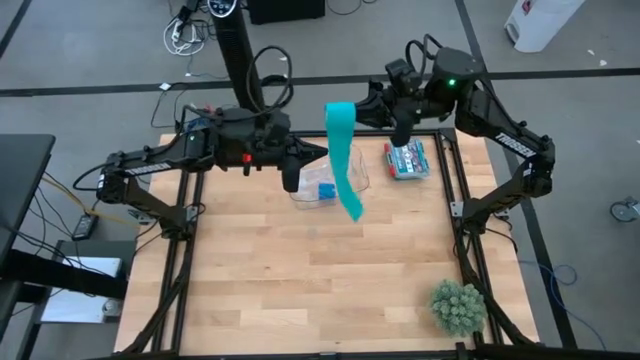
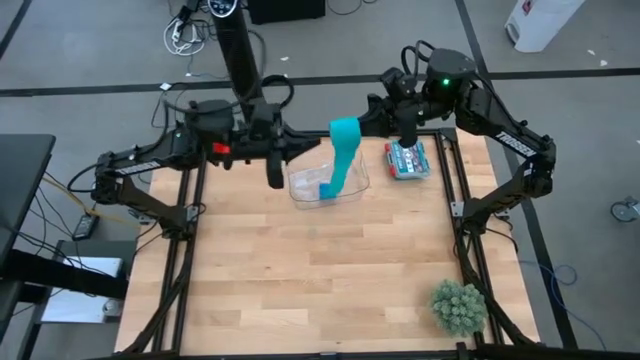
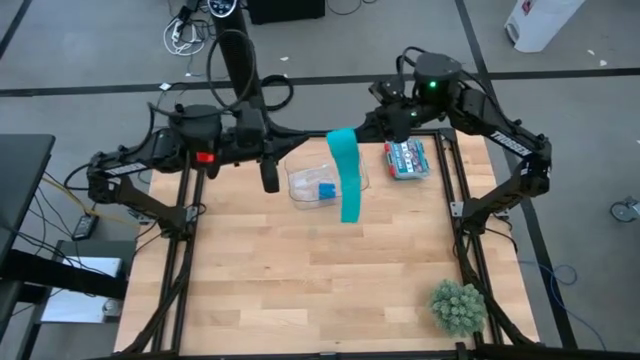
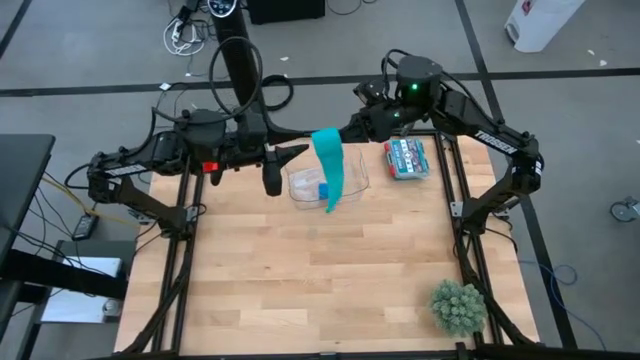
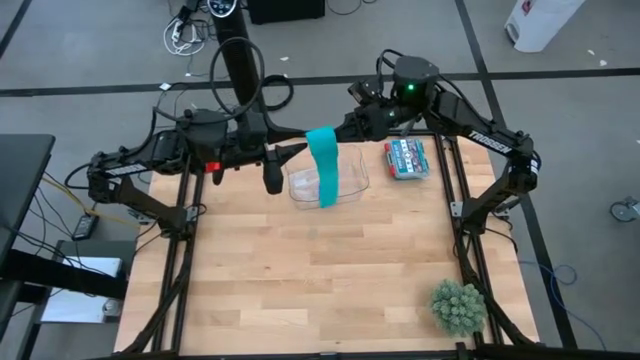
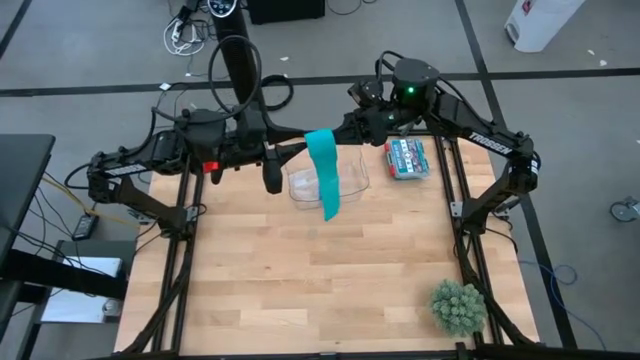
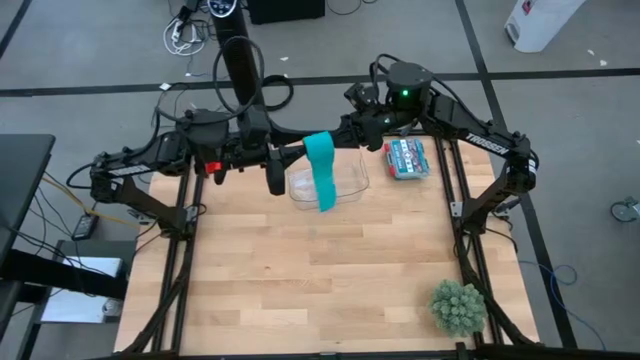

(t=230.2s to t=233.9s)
Task: Roll bandage
Roll the sky blue bandage

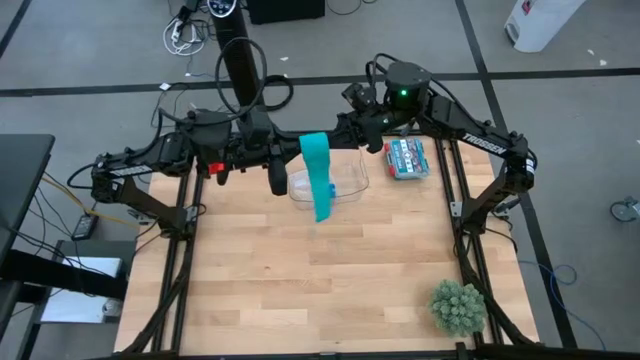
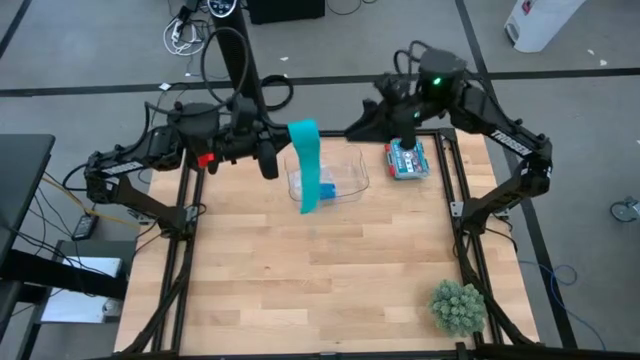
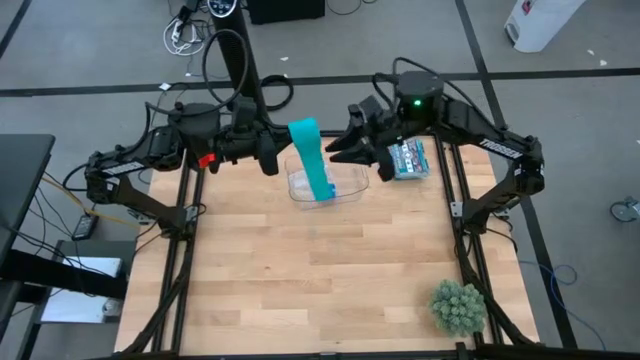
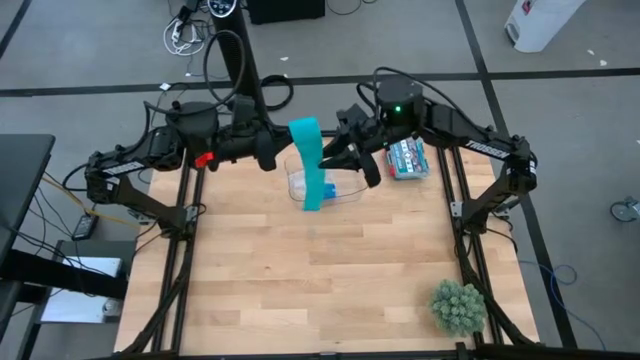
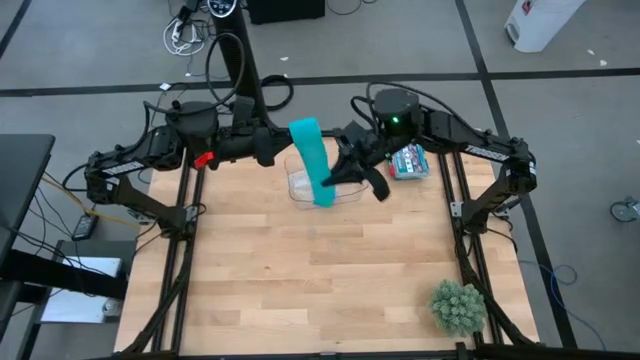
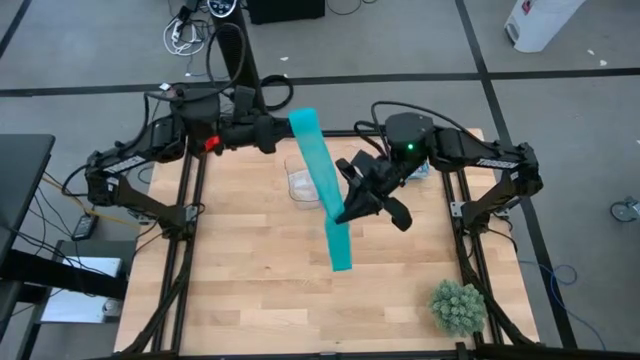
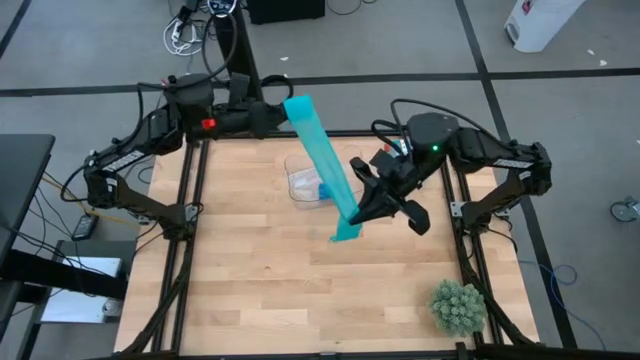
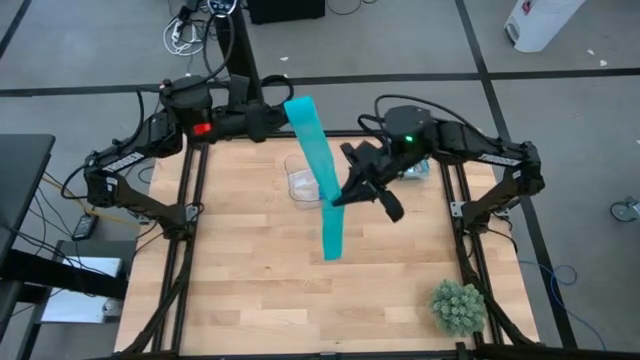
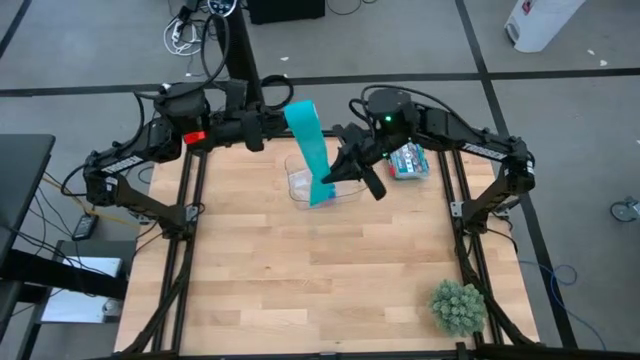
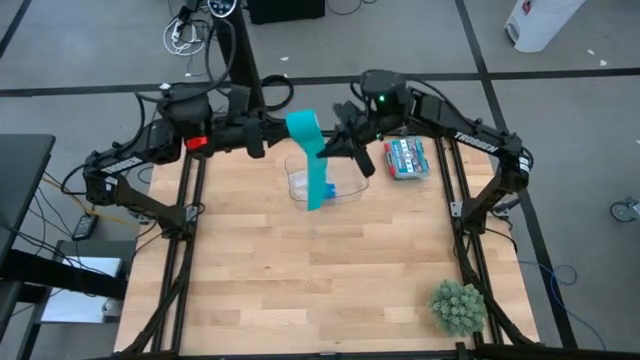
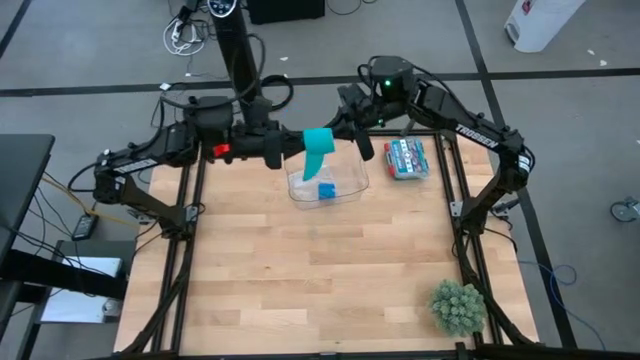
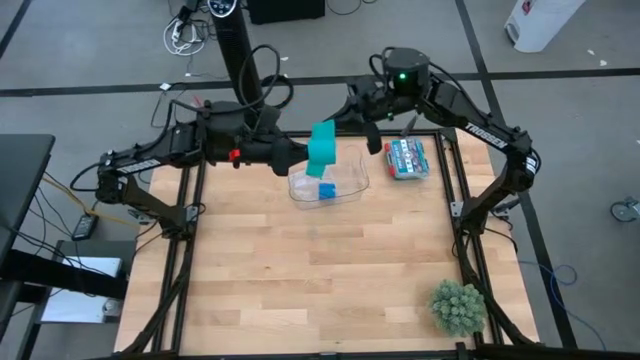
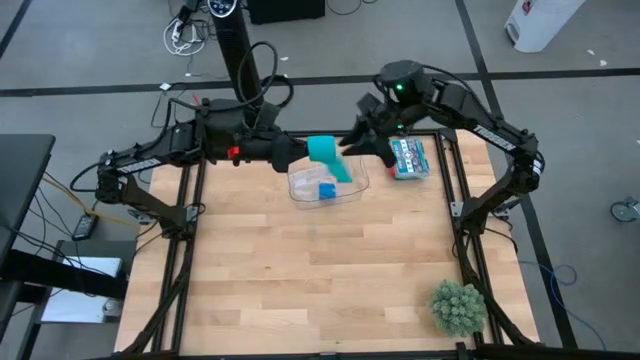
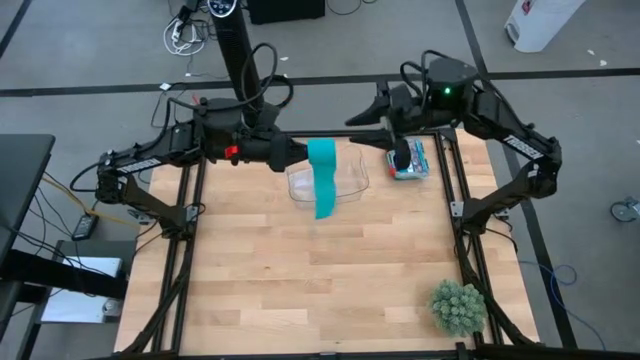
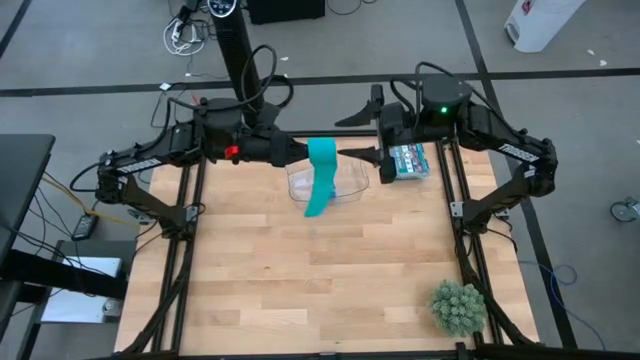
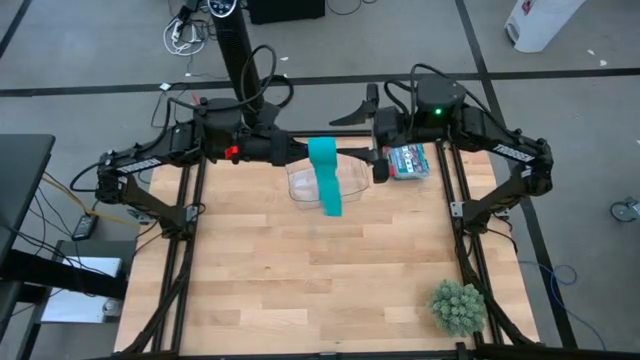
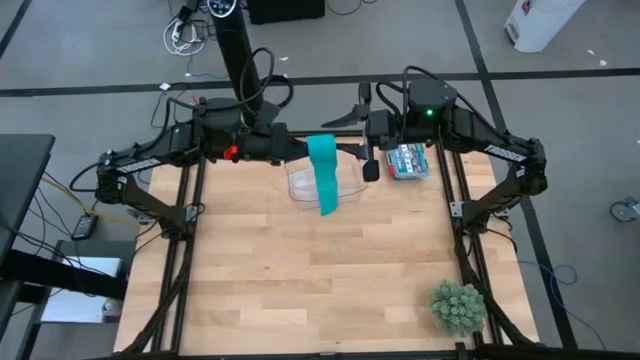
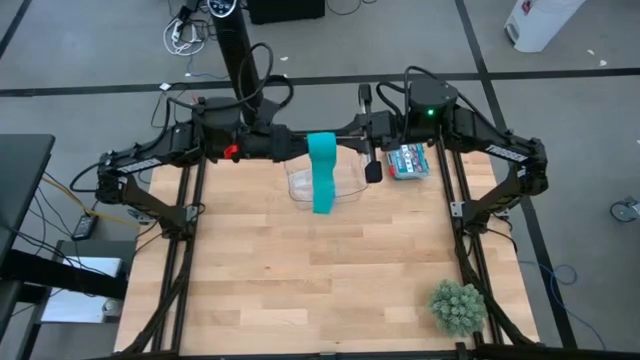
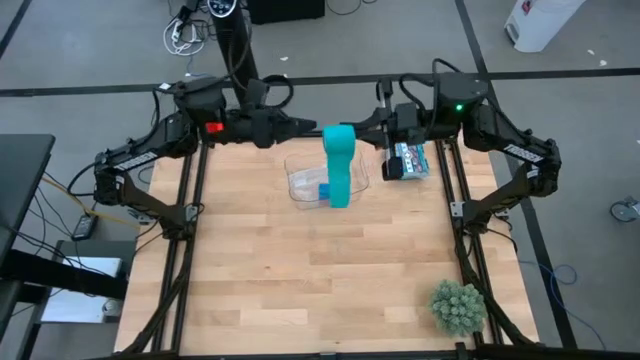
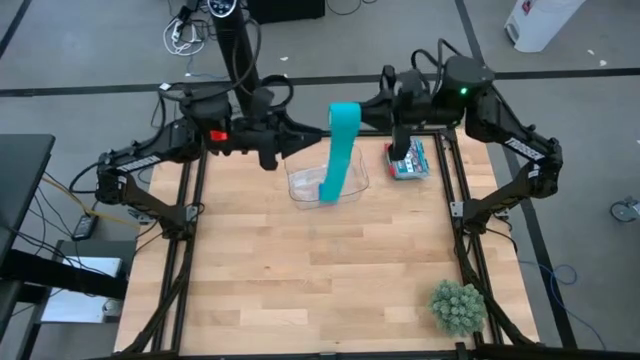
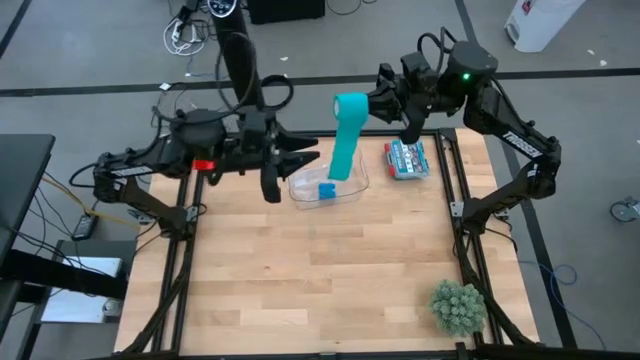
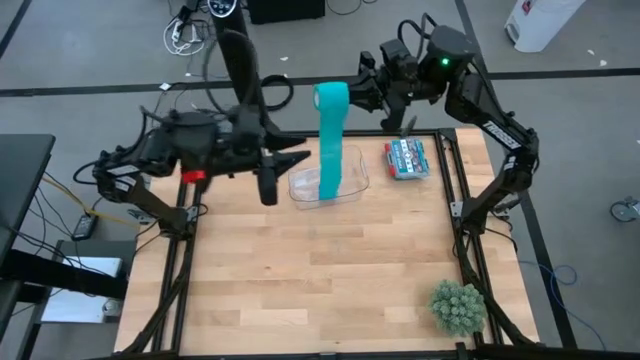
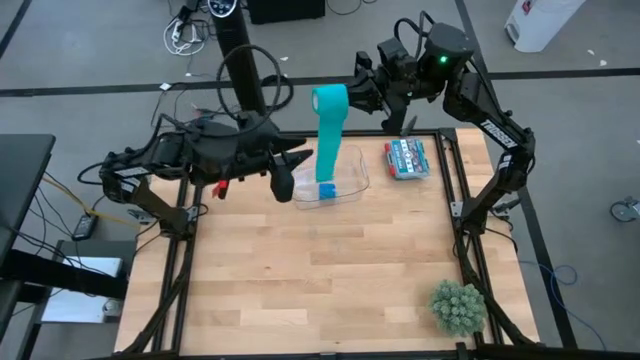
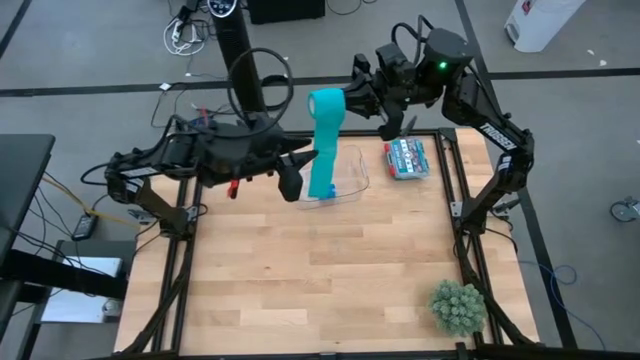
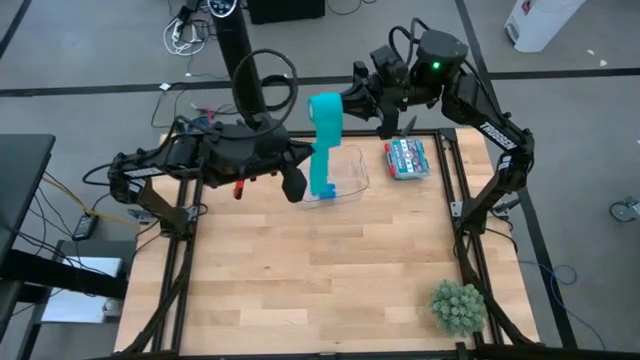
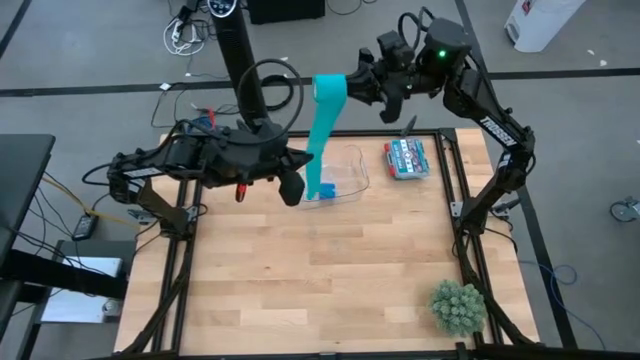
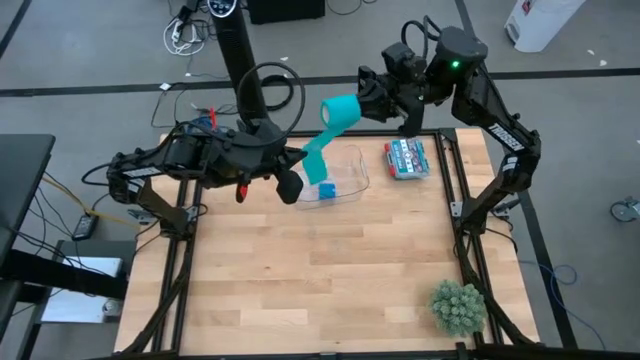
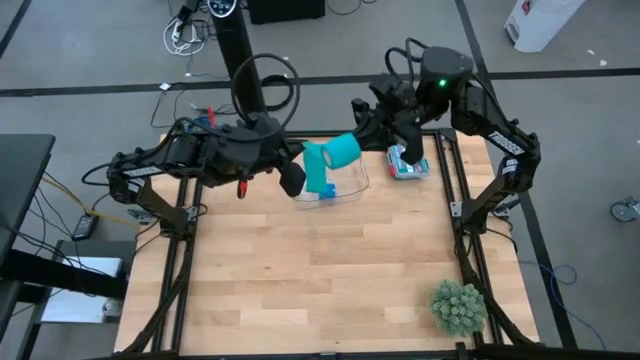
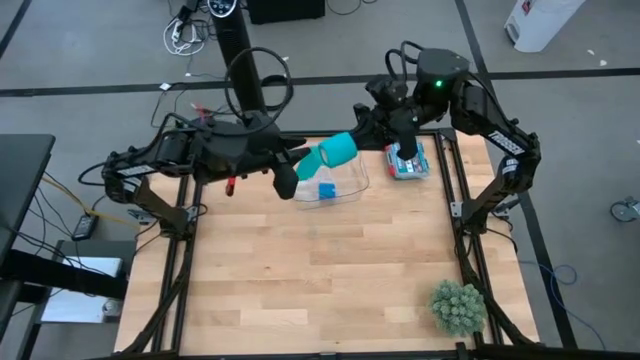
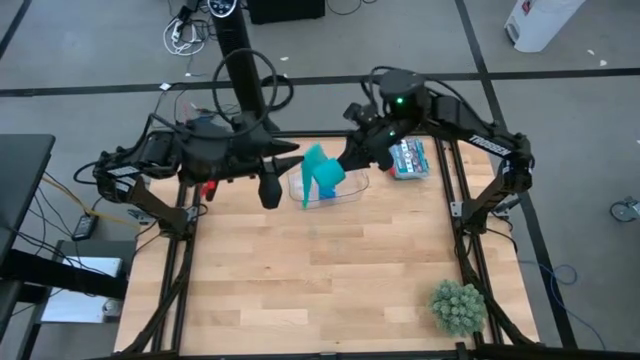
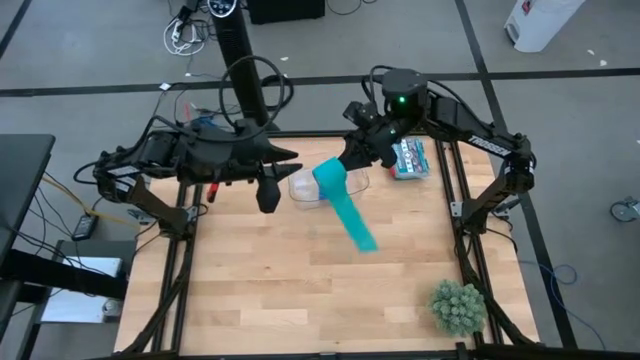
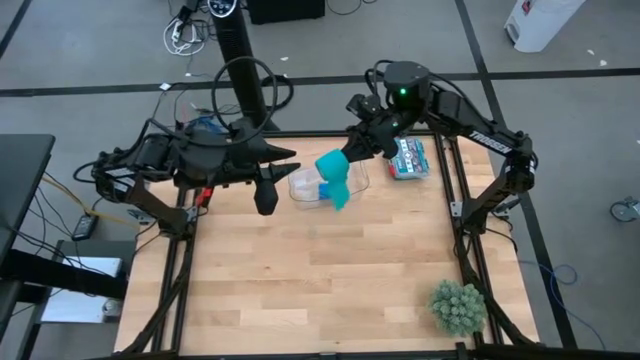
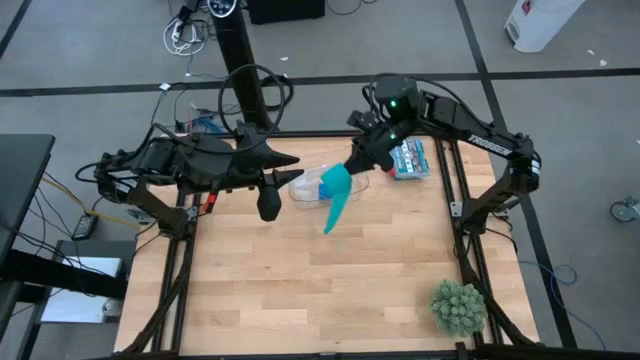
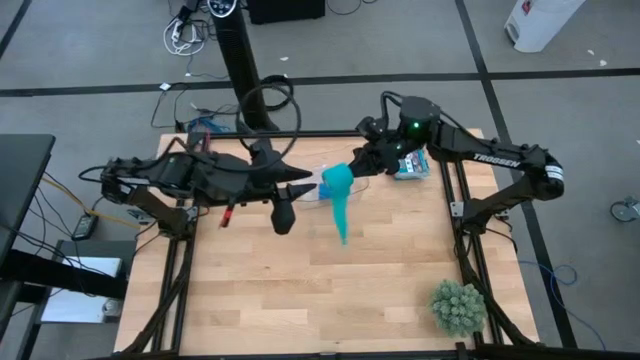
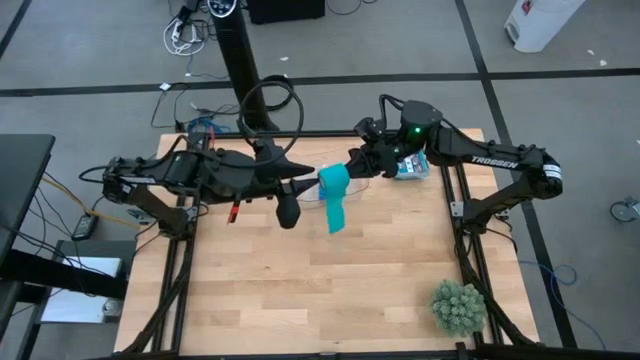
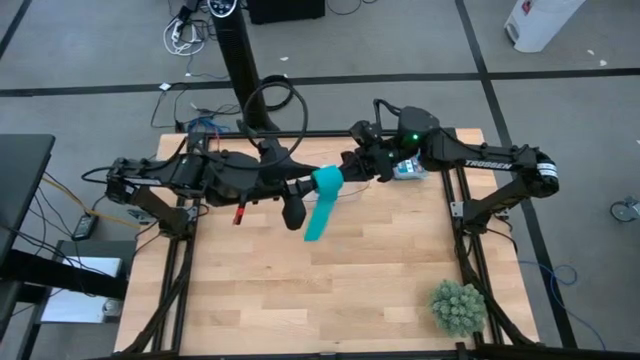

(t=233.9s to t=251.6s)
Roll the sky blue bandage
